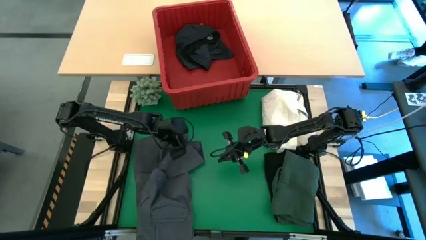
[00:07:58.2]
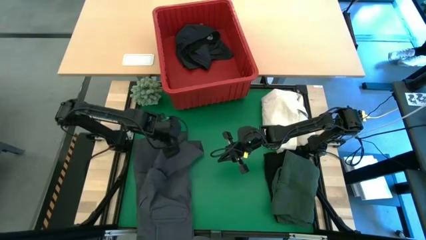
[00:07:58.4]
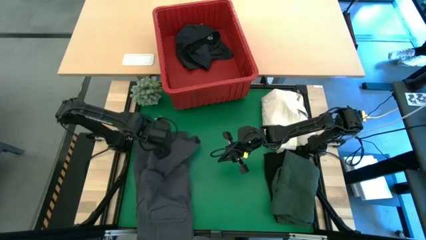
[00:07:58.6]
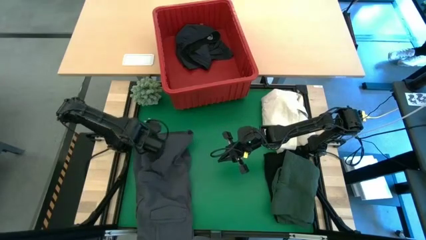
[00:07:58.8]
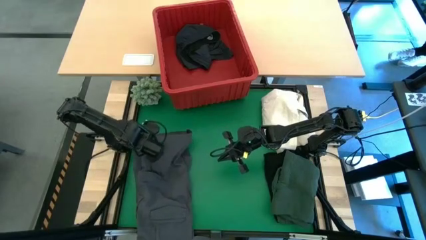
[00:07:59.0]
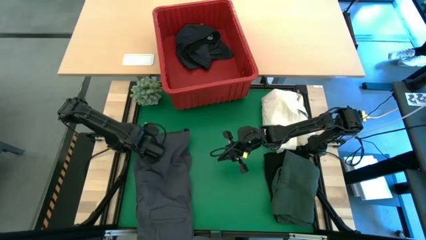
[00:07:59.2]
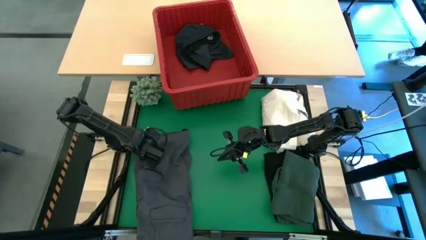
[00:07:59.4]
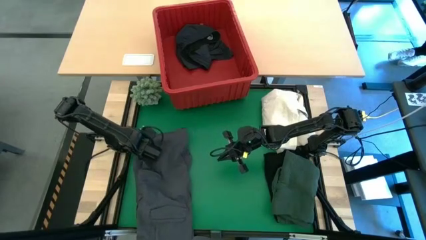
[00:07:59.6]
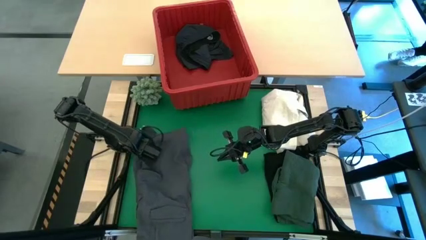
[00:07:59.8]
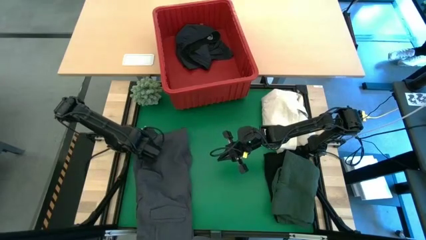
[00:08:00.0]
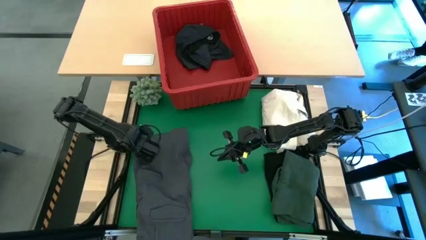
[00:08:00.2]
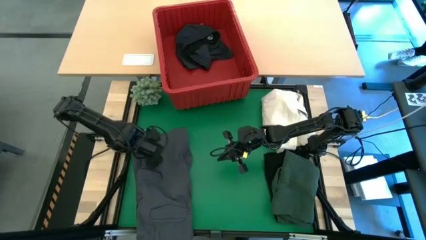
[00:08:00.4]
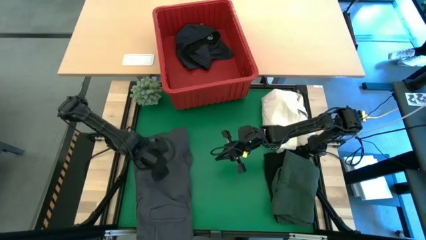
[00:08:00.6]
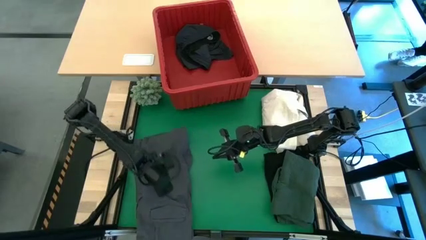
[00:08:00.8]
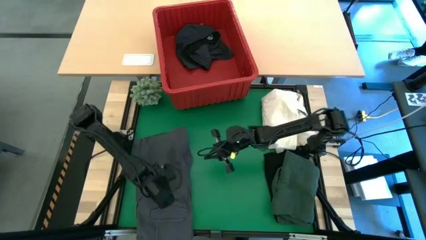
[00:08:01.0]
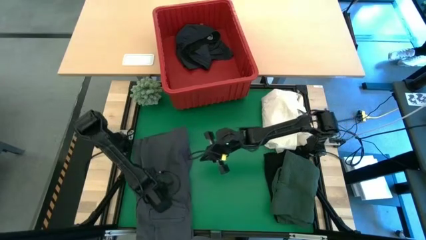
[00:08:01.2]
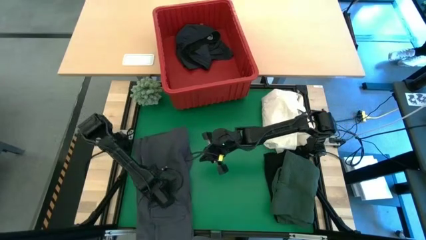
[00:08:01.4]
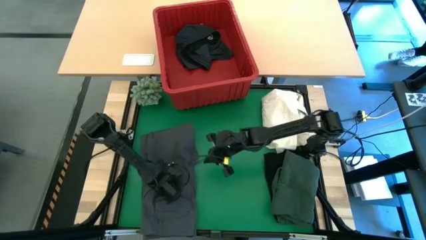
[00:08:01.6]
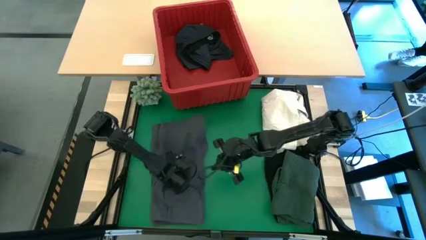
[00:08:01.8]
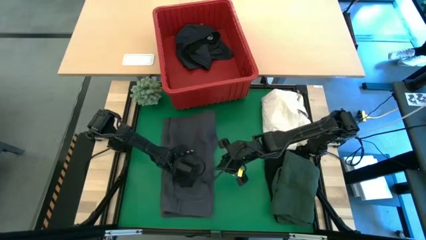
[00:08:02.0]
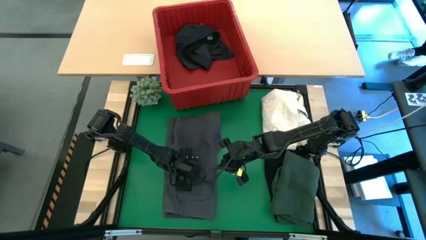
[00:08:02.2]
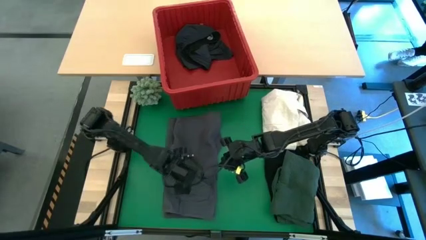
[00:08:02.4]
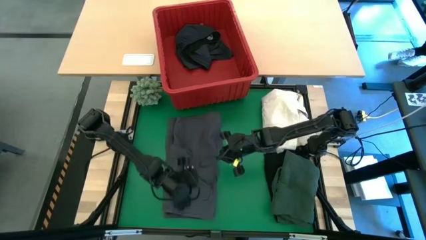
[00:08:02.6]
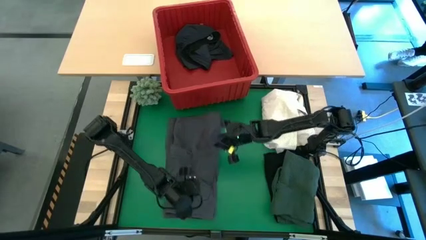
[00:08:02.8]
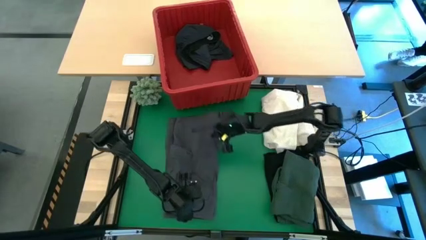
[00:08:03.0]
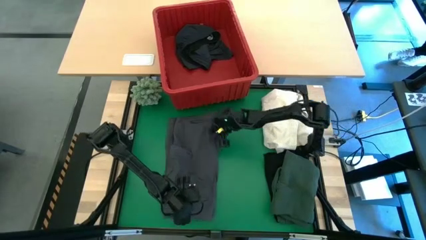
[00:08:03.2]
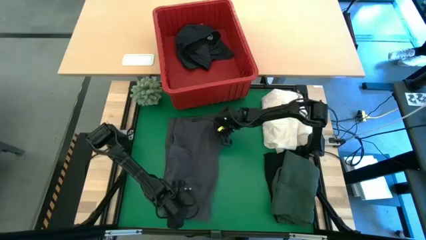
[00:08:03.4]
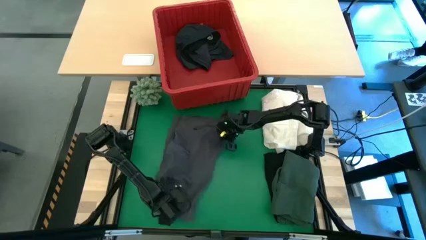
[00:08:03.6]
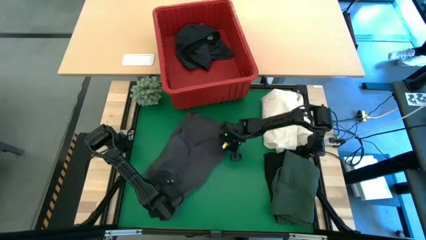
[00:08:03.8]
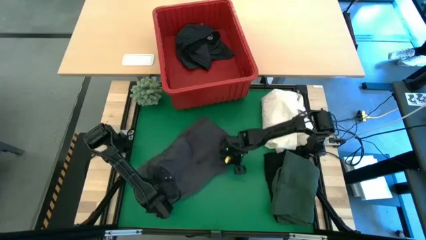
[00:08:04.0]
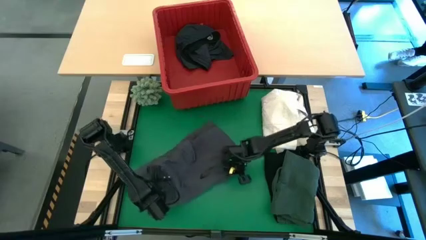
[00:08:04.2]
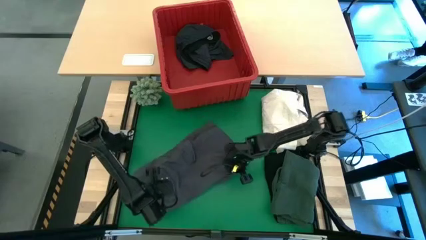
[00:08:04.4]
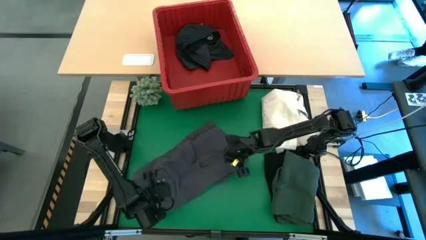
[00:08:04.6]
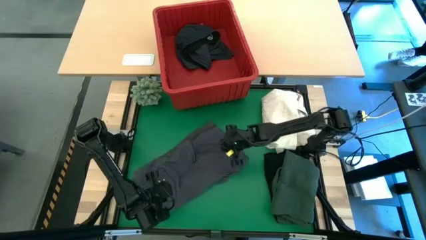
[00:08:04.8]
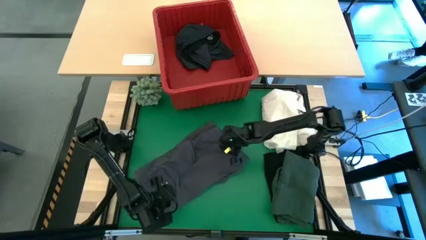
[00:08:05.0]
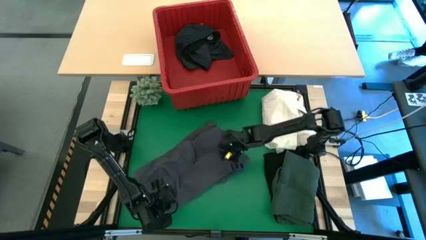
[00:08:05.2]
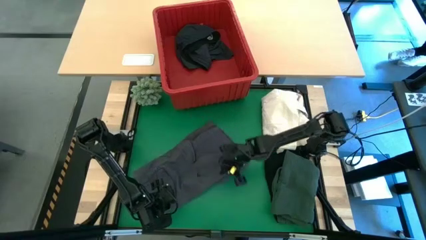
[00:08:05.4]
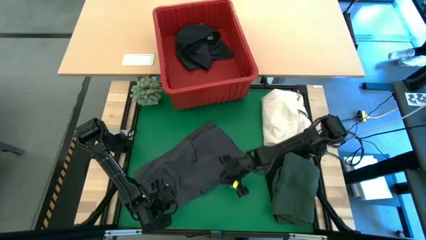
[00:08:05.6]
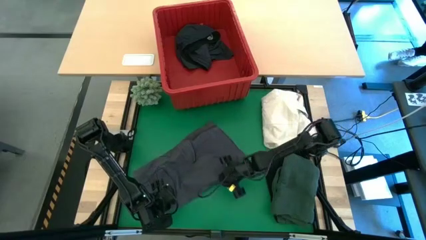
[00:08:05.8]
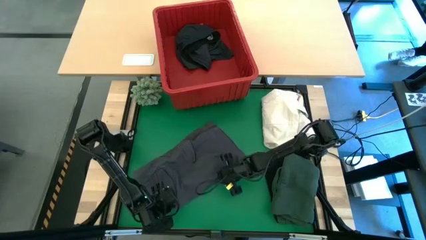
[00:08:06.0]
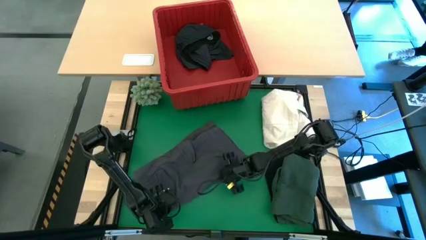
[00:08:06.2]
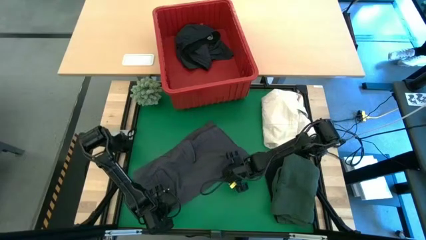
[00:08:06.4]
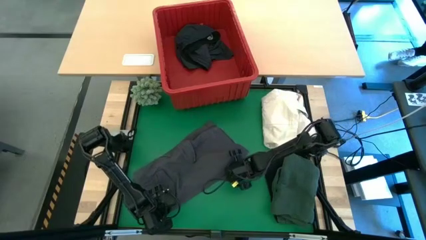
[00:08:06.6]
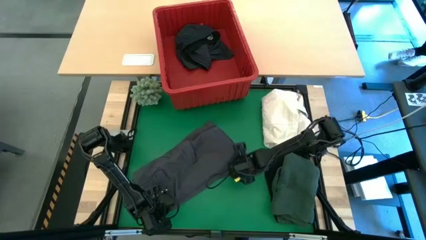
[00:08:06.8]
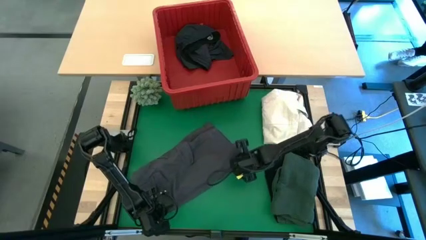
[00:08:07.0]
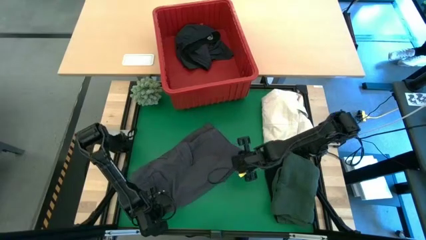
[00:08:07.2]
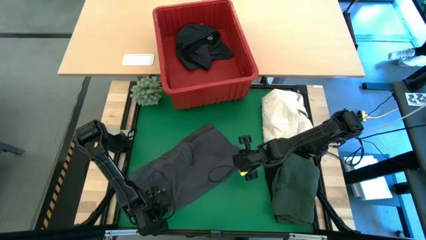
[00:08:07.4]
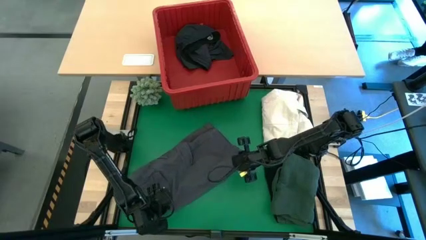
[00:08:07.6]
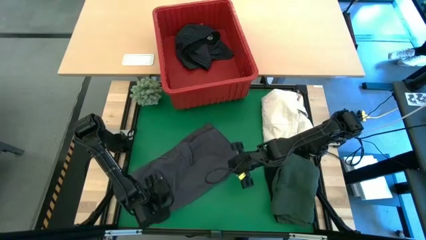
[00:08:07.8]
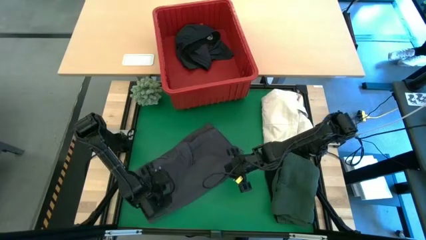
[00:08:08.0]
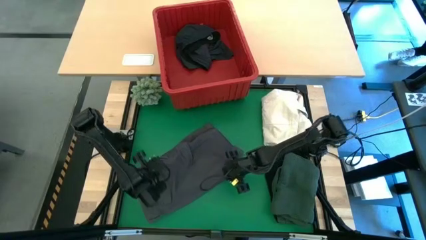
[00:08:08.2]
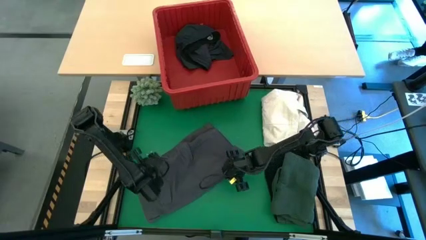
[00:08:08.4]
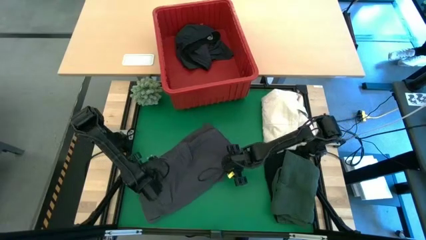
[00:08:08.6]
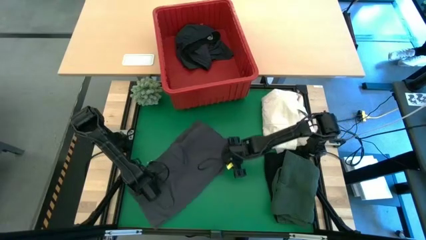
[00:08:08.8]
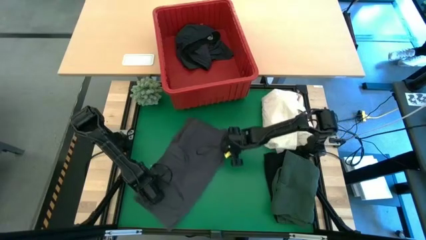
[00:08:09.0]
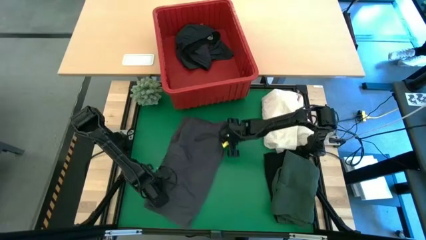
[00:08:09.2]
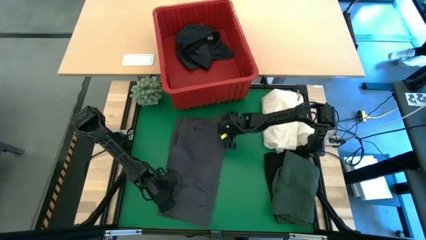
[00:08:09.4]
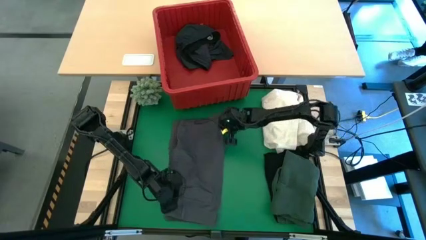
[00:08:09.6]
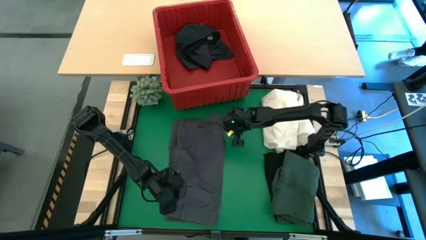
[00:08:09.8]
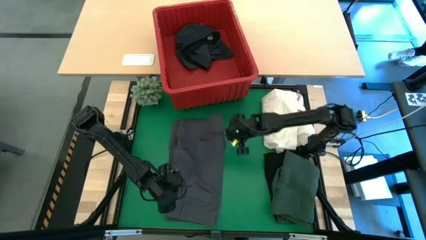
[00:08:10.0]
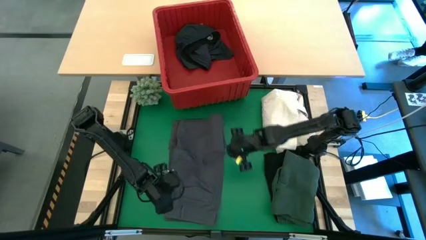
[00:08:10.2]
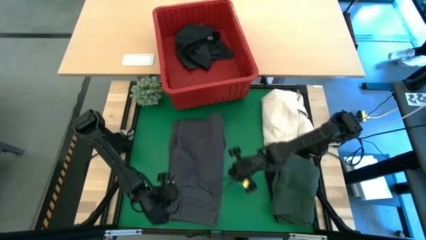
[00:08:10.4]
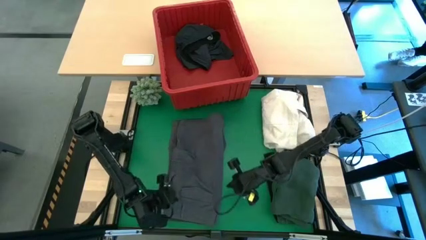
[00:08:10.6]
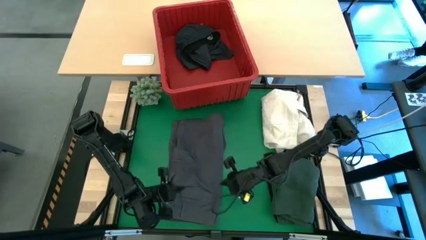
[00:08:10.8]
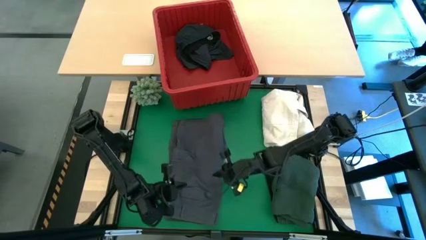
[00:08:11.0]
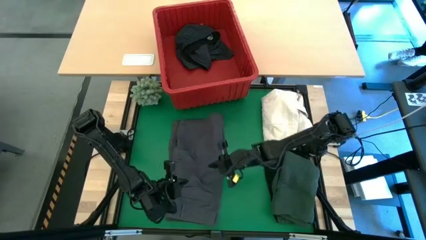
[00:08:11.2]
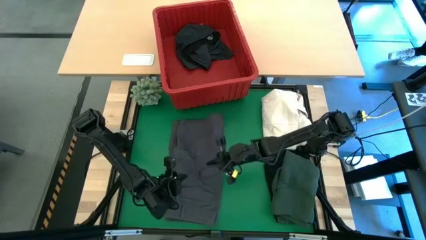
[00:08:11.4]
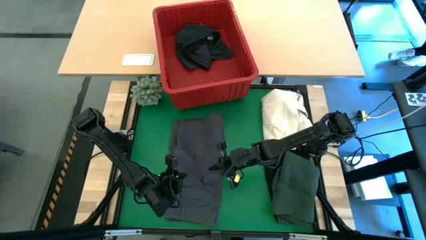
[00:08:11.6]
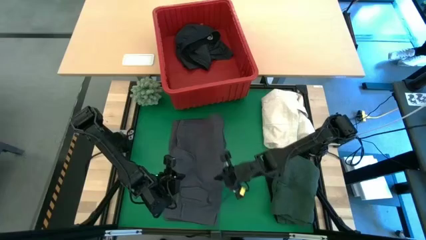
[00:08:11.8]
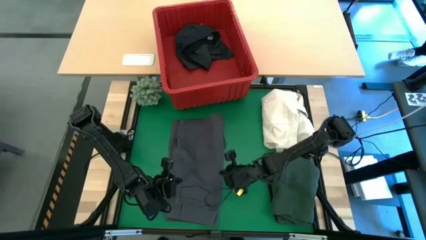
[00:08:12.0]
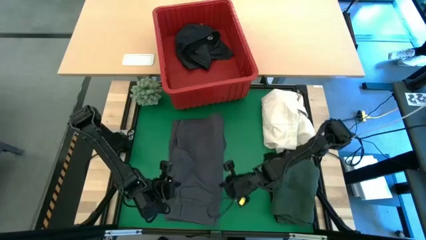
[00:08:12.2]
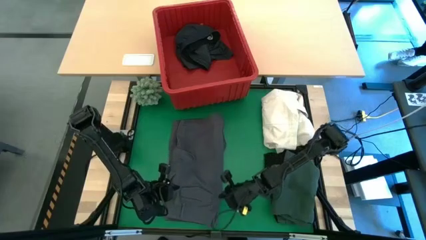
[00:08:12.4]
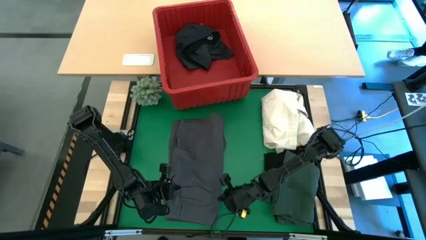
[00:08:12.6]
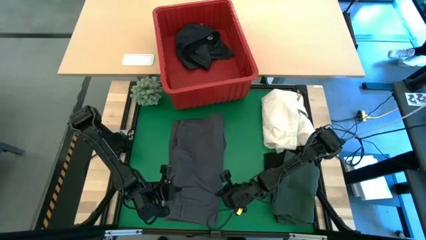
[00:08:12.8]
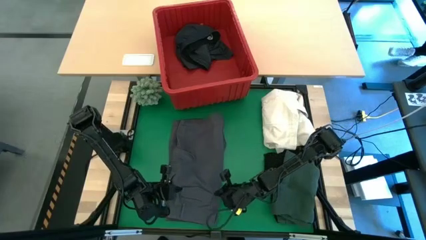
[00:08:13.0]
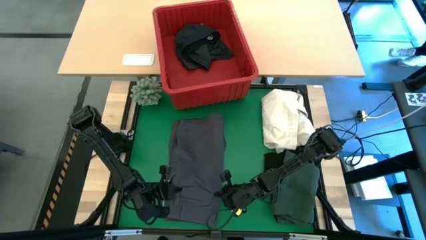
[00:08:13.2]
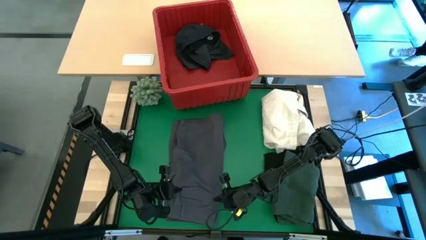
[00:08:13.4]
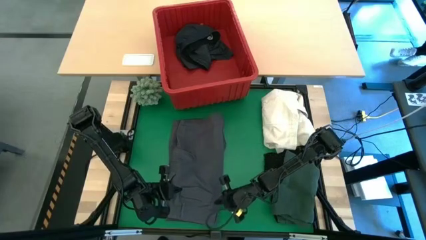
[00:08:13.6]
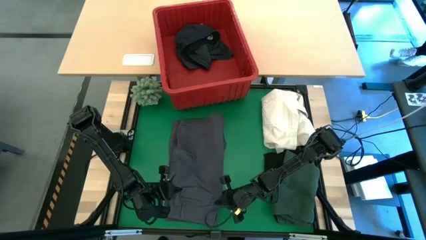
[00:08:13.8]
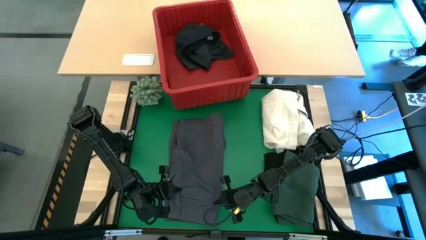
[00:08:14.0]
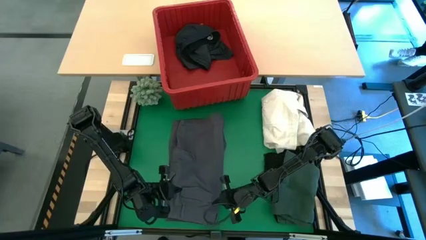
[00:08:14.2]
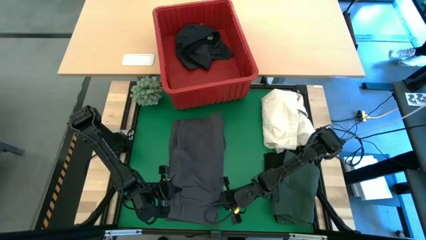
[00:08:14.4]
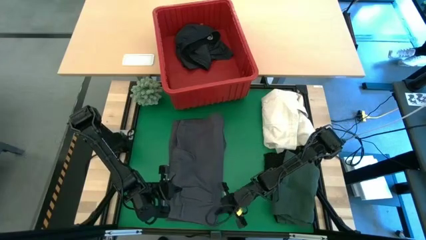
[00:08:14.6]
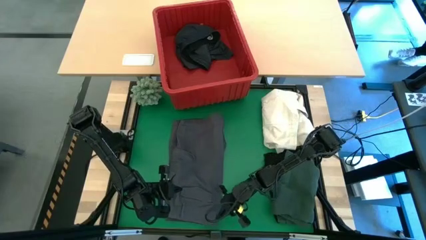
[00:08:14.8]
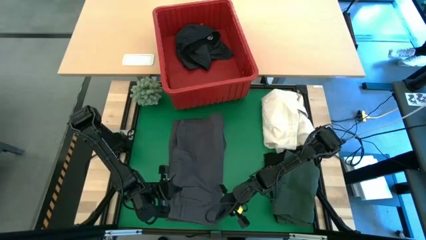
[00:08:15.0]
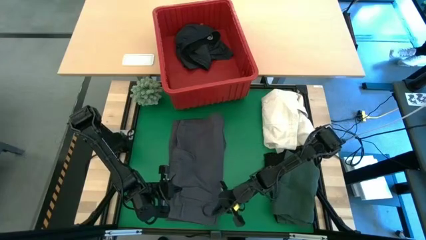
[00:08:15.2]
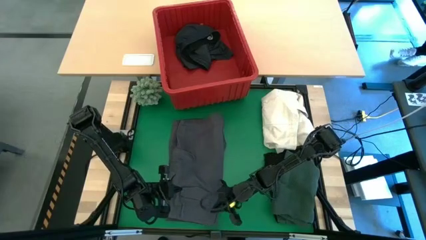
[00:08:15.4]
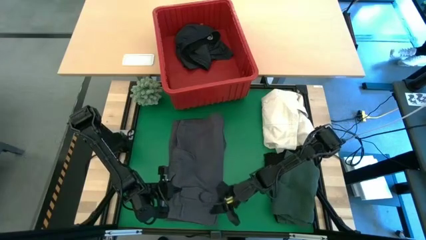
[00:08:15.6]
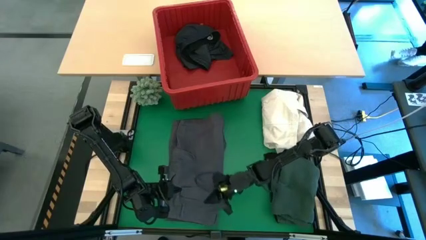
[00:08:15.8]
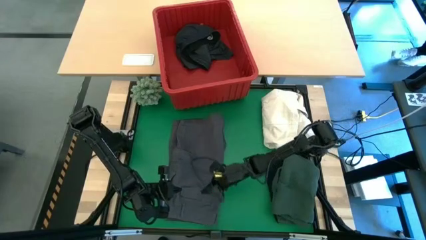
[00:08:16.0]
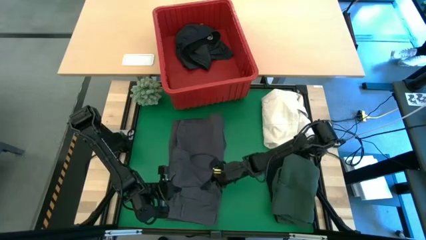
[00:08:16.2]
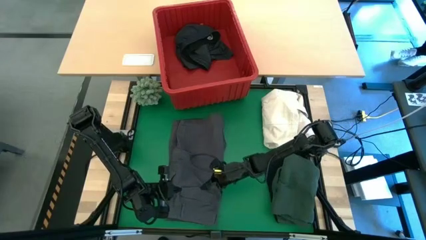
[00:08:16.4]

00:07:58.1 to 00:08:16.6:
Task: Fold laundry
Fold the gray pants
